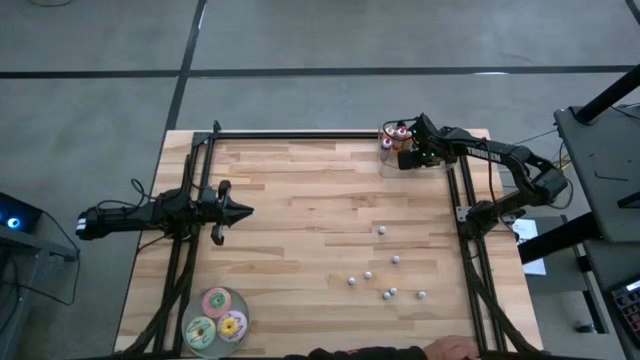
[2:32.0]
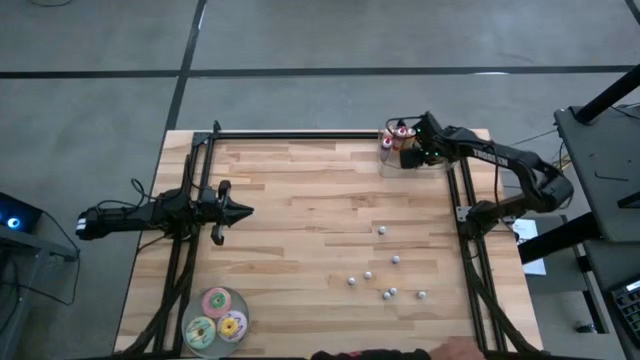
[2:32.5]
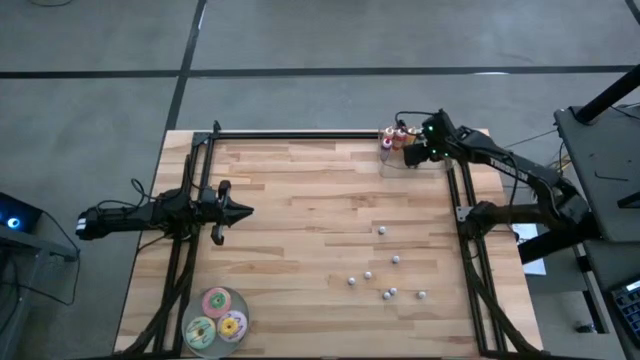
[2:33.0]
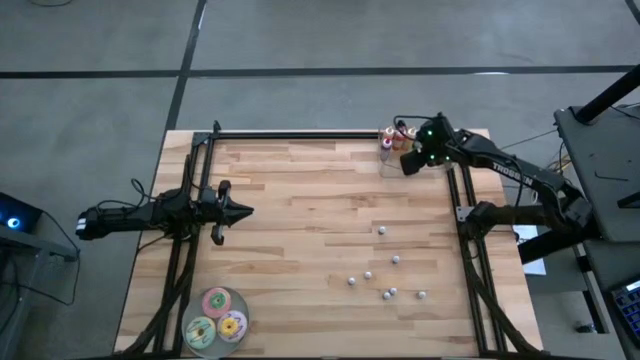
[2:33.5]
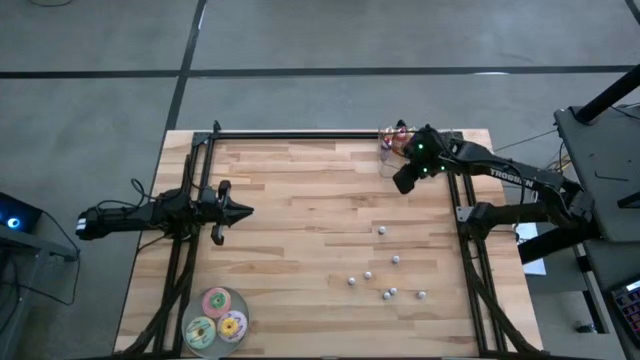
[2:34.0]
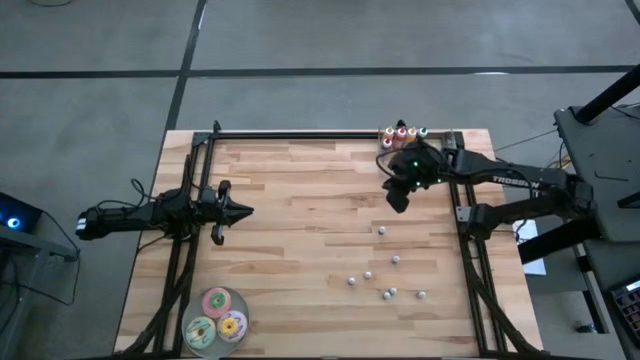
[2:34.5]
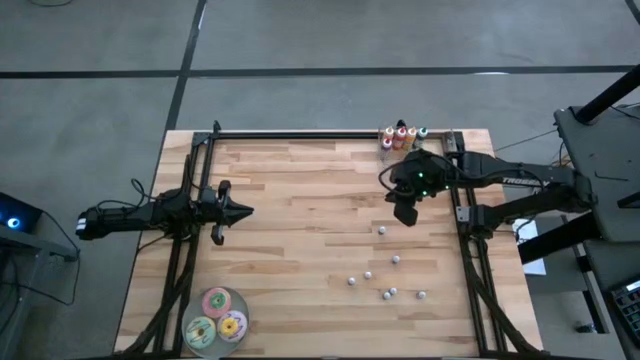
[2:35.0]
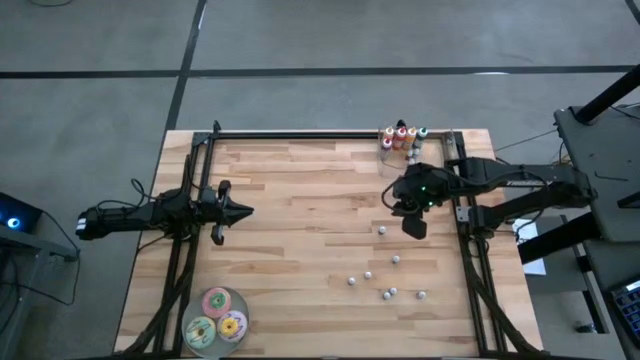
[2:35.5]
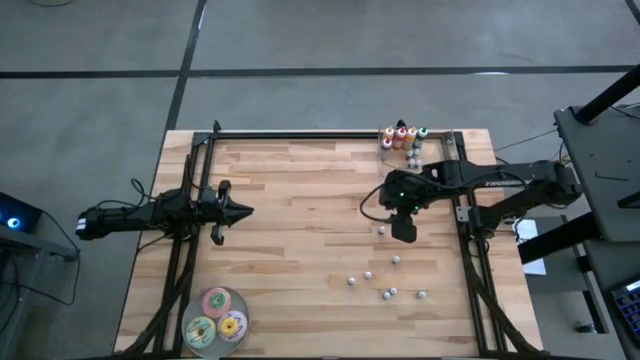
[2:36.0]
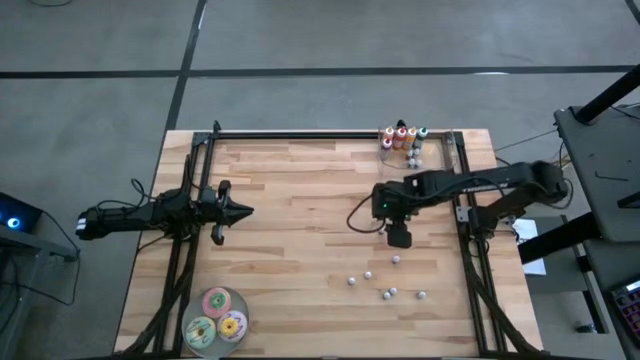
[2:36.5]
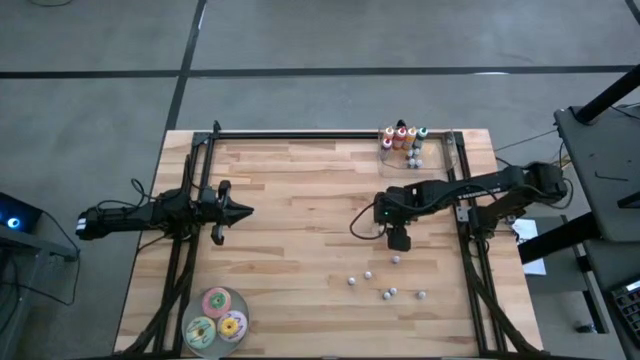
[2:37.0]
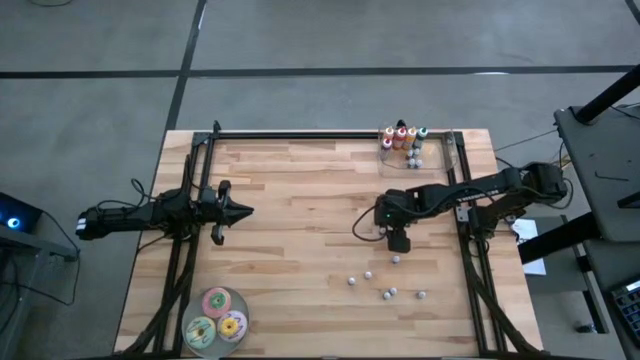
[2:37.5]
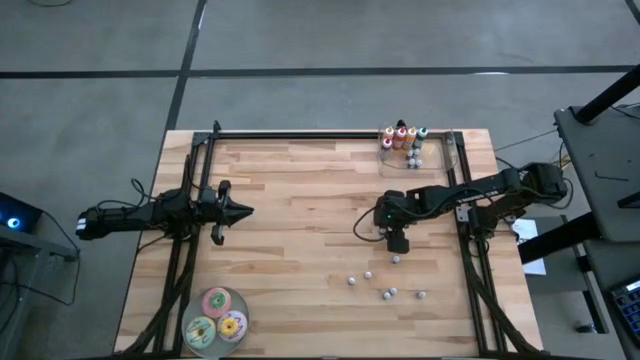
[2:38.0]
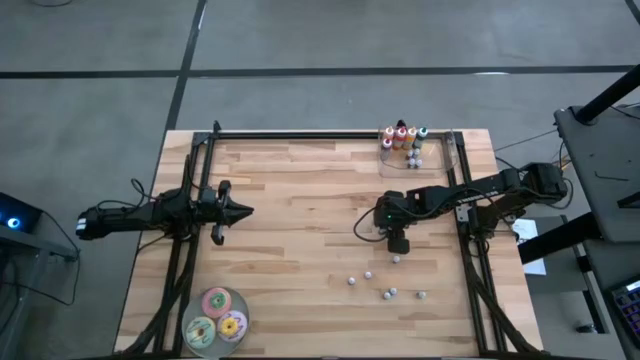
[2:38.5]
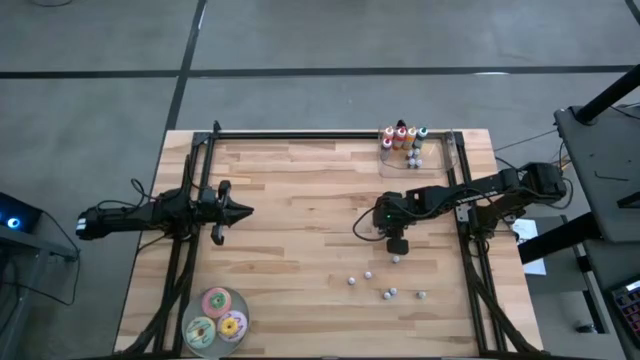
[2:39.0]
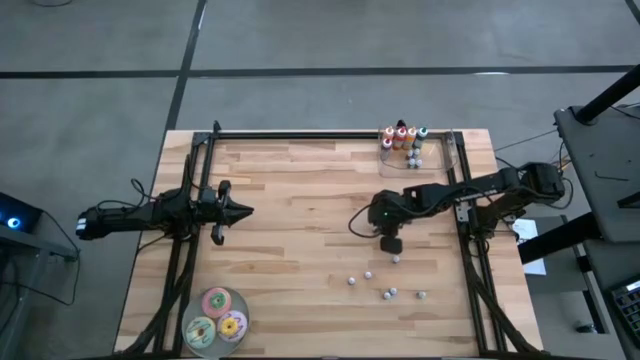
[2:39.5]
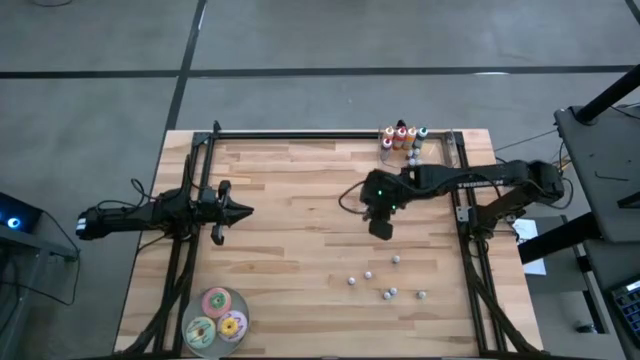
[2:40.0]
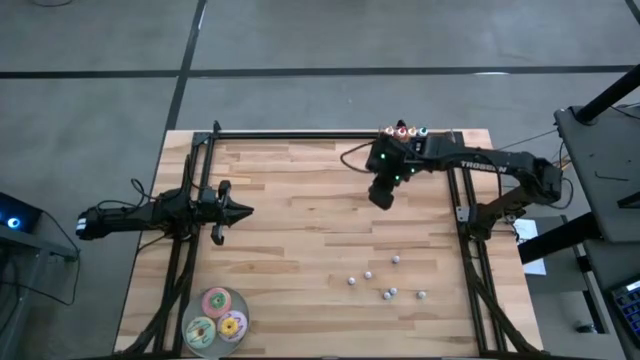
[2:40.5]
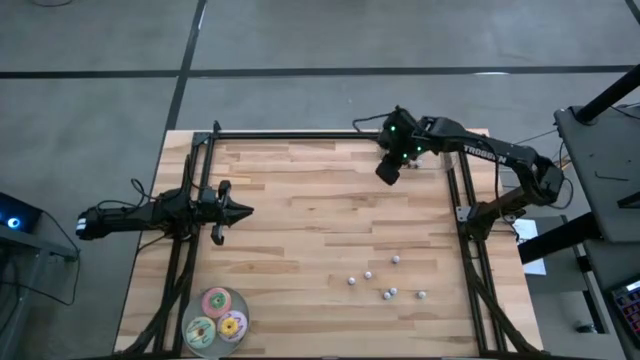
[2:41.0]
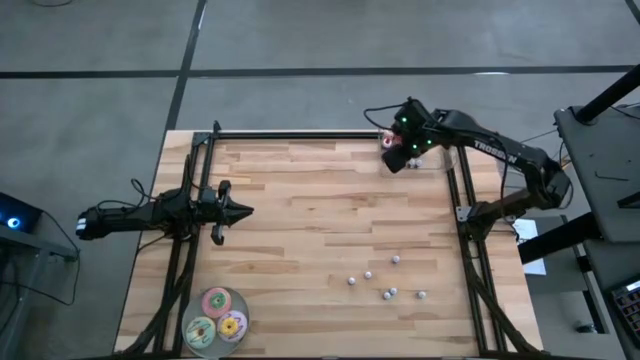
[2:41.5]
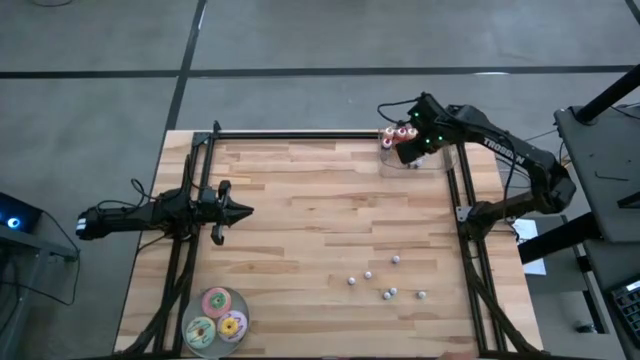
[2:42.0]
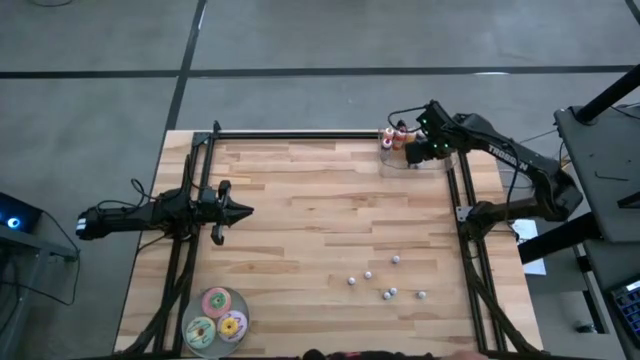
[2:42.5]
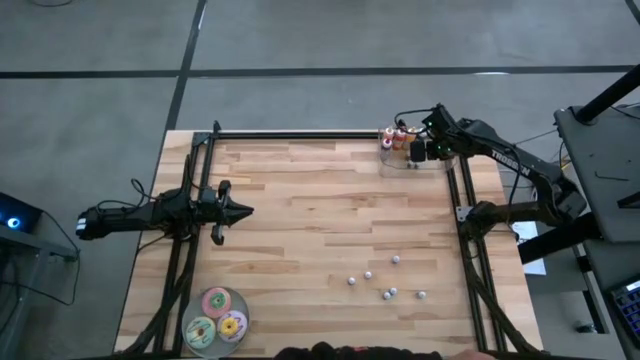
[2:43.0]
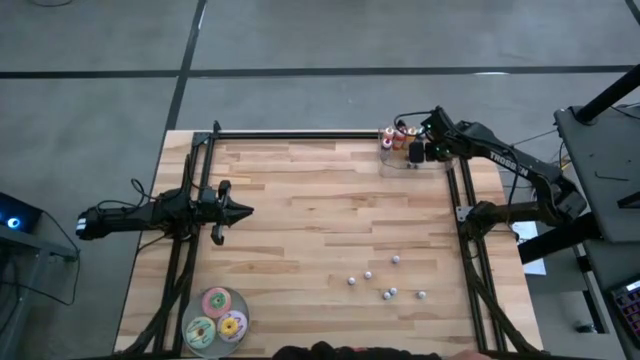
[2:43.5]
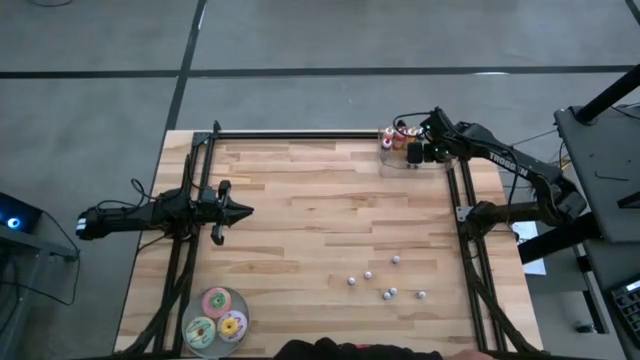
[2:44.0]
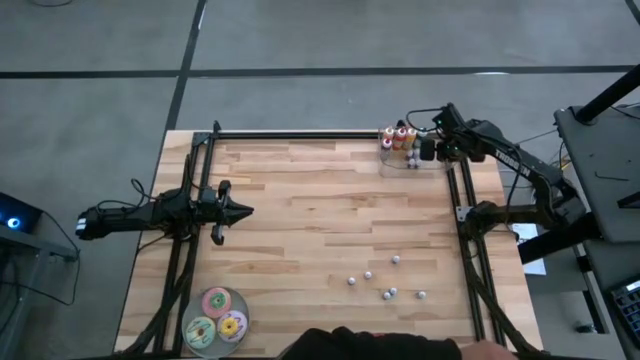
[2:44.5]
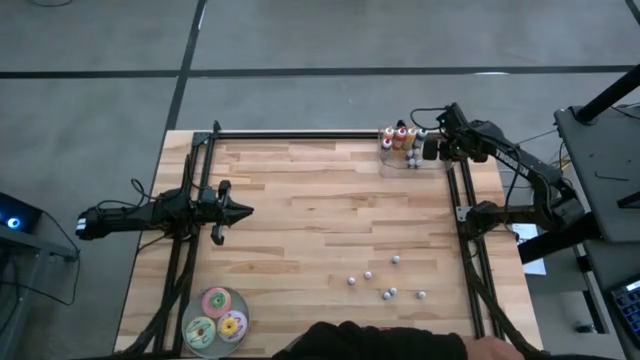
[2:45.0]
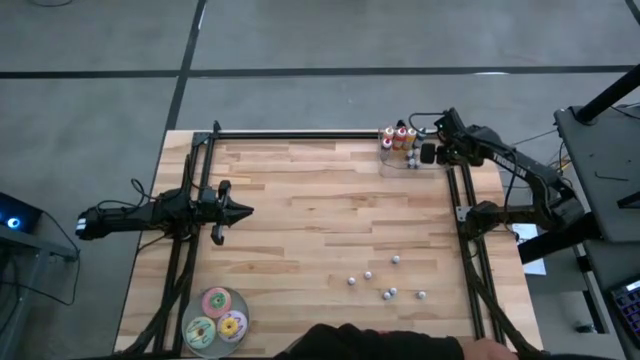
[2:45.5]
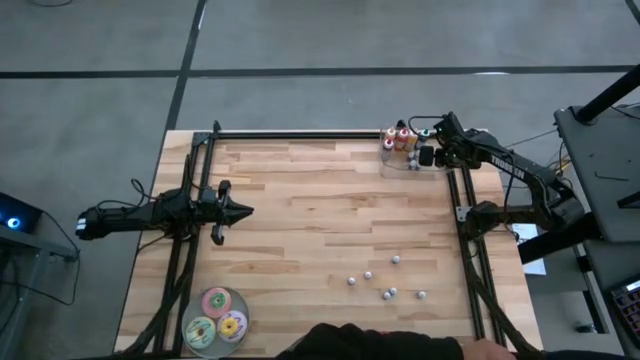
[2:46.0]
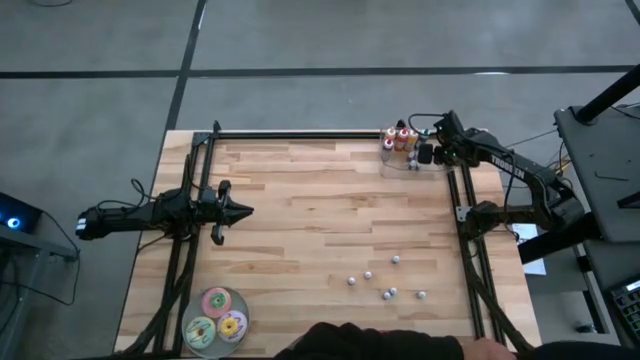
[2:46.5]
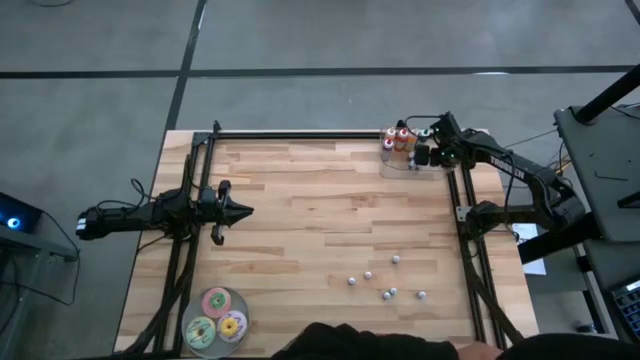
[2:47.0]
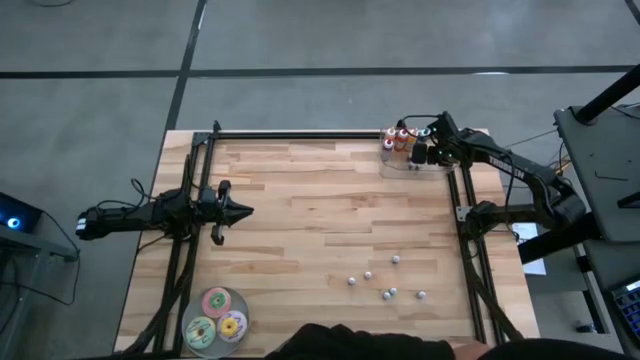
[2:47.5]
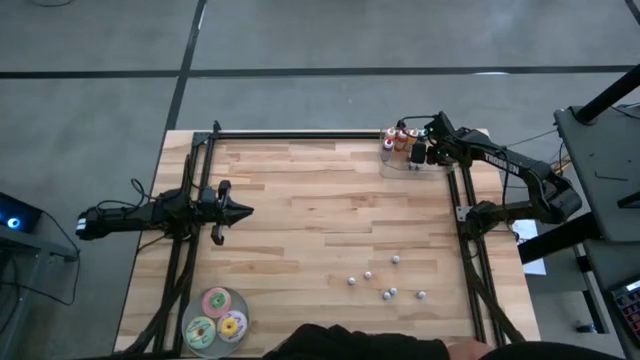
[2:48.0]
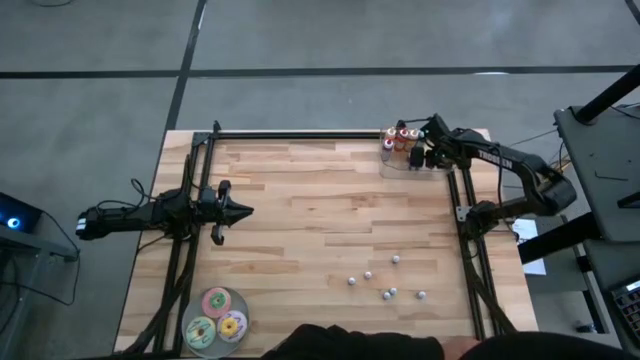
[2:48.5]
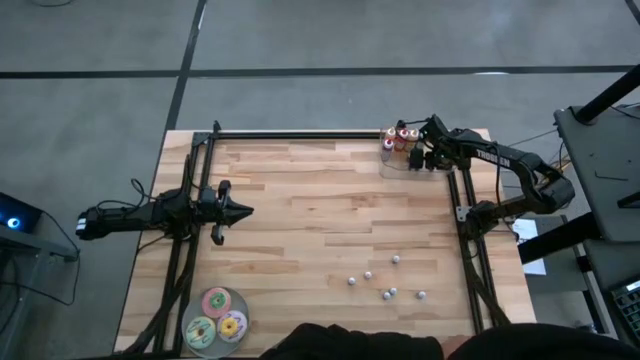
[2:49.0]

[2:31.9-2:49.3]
Task: Pick & Place food coloring
Put the top small red food coloring bottle into the bin

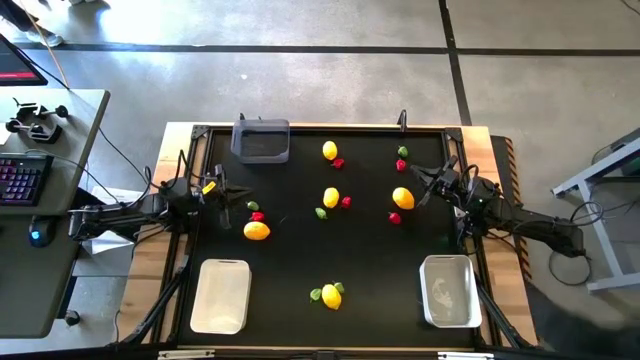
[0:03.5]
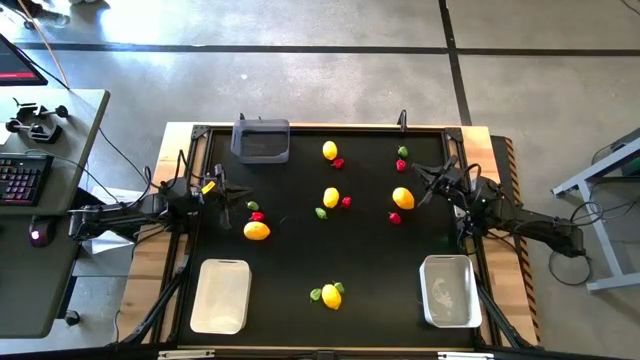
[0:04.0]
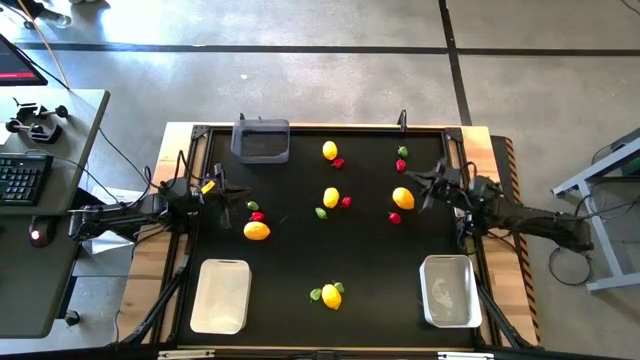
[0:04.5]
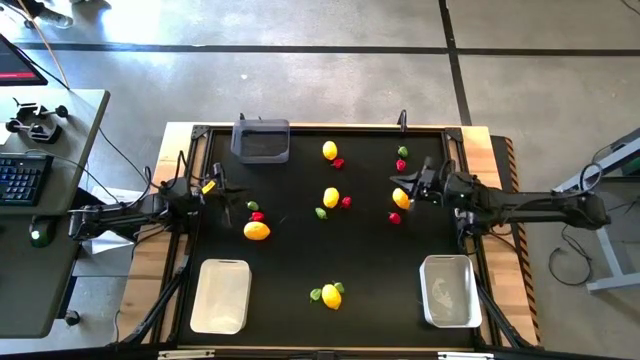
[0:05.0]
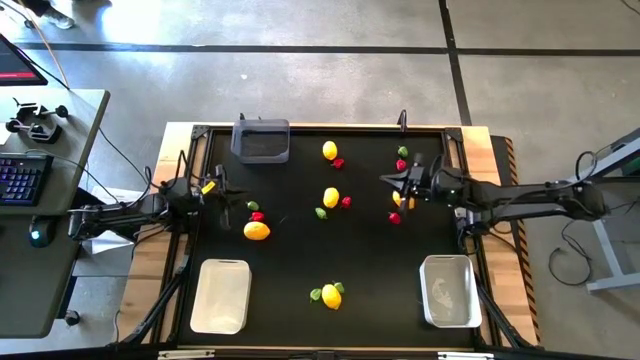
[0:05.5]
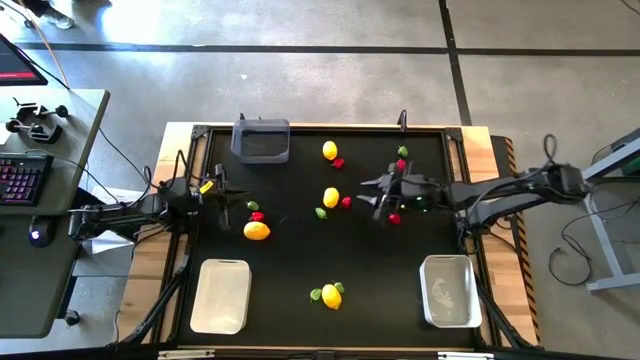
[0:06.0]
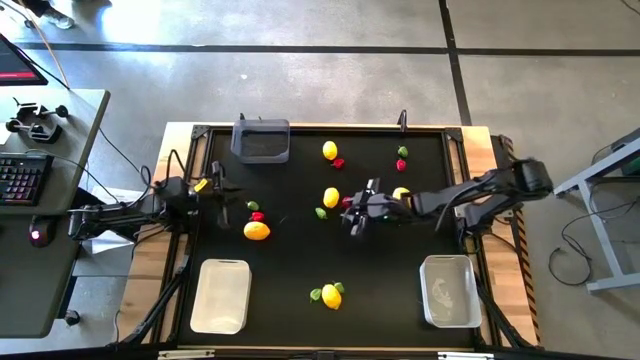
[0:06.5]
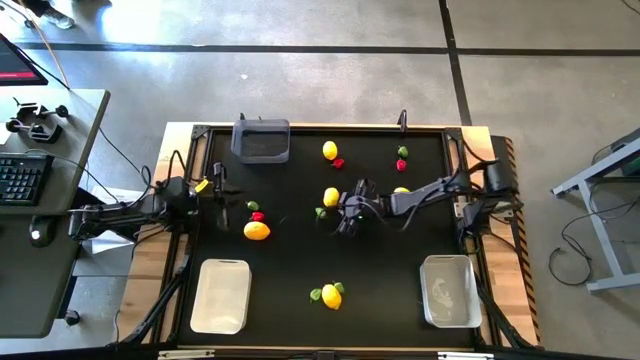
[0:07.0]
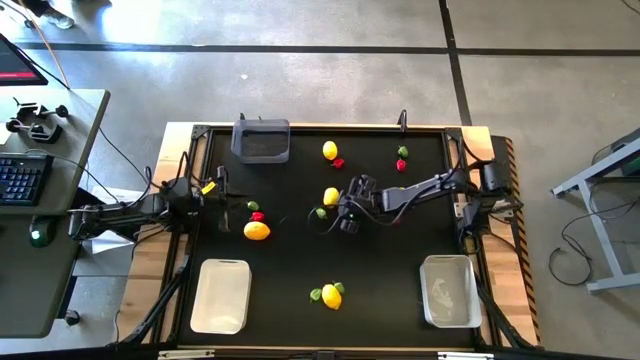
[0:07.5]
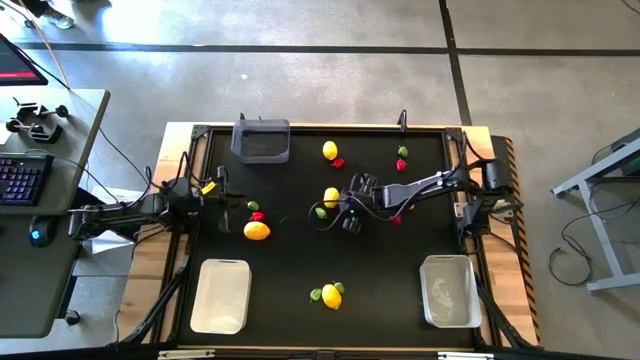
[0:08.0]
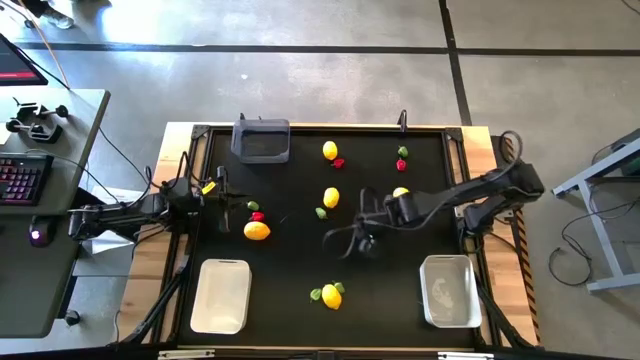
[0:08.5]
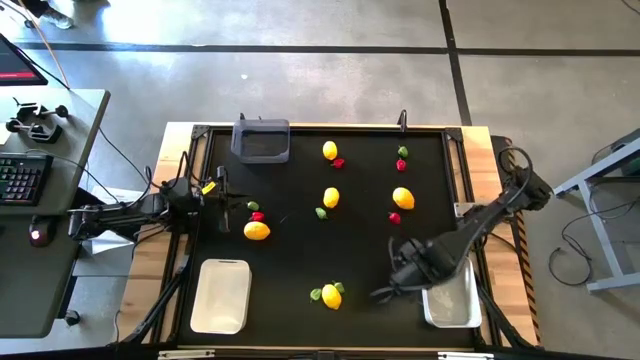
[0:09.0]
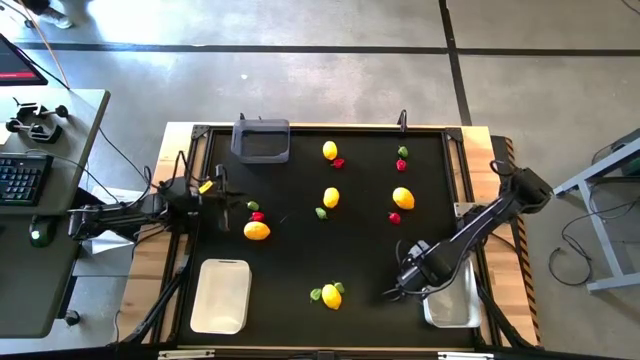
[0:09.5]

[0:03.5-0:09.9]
Task: Sort produce into baskets
Put the red chili pepper into the gray bin
